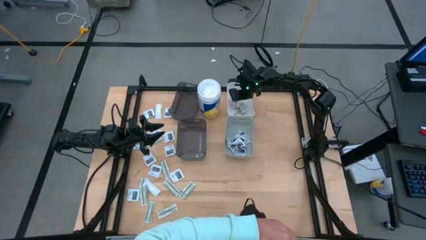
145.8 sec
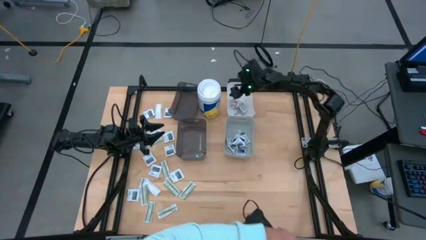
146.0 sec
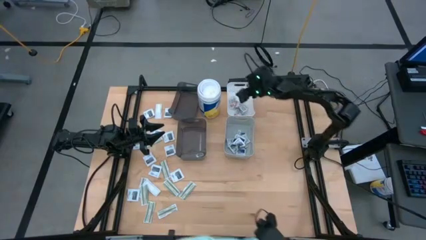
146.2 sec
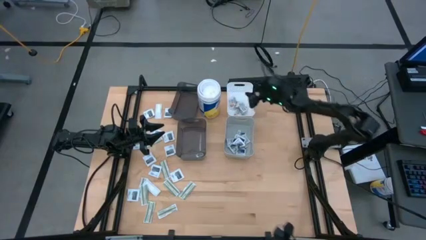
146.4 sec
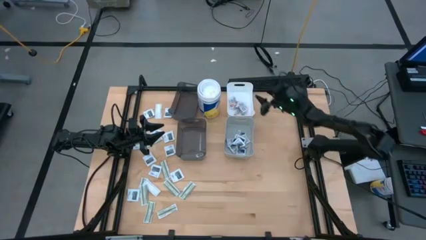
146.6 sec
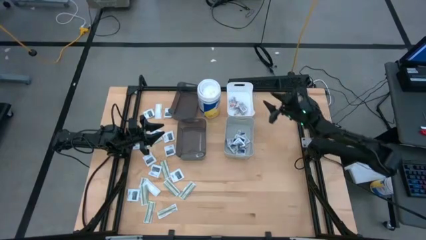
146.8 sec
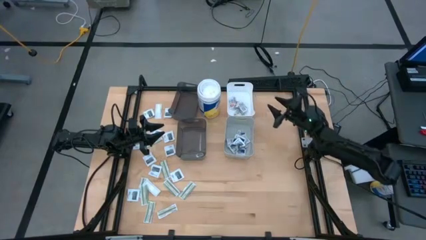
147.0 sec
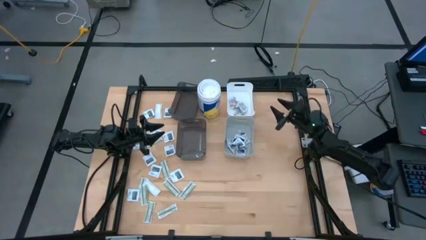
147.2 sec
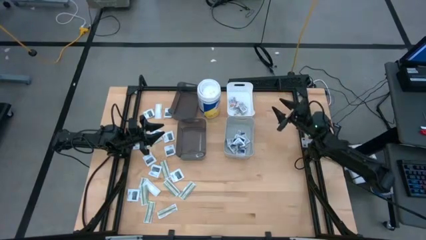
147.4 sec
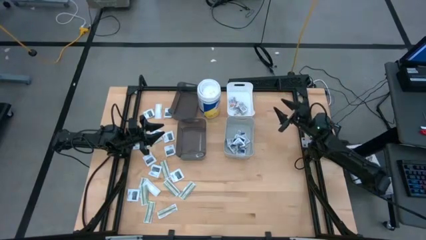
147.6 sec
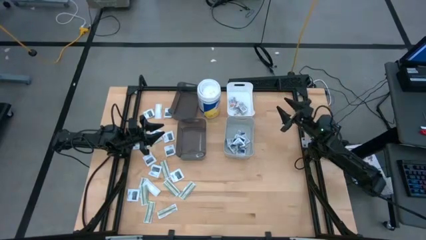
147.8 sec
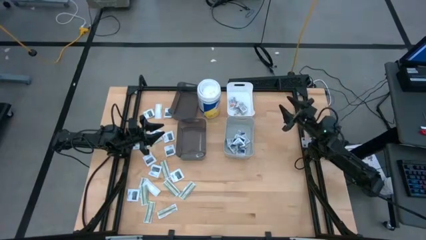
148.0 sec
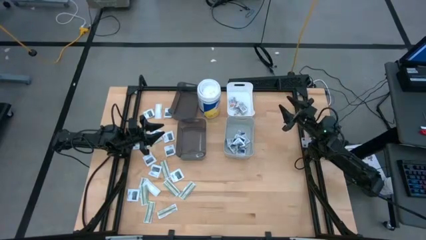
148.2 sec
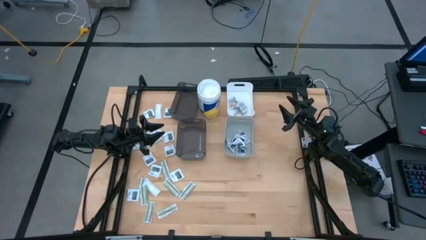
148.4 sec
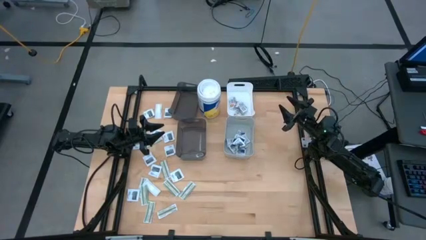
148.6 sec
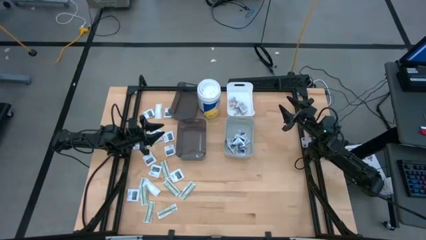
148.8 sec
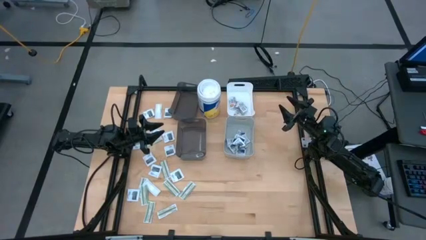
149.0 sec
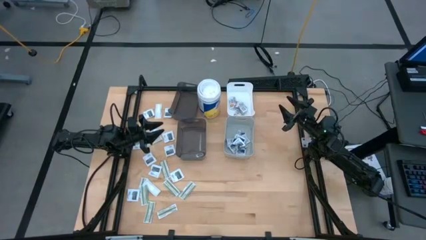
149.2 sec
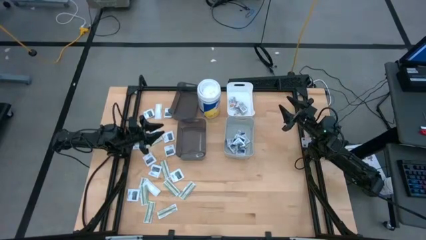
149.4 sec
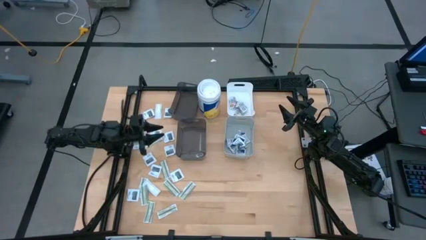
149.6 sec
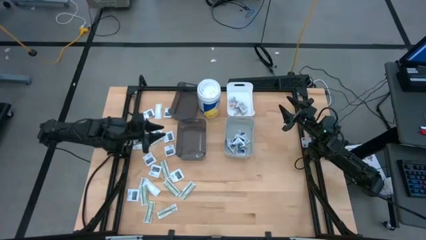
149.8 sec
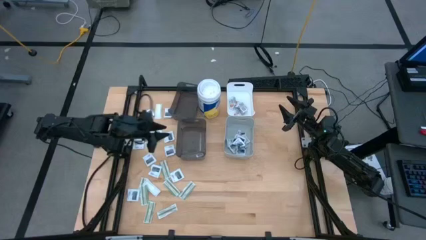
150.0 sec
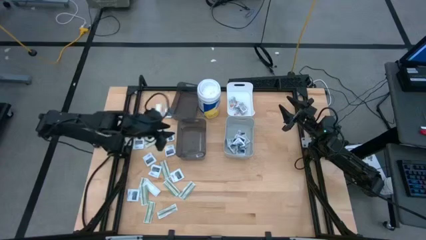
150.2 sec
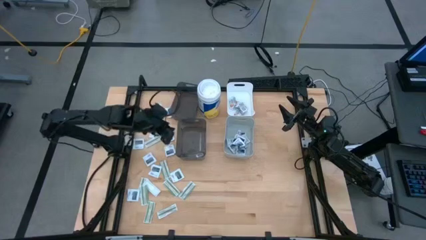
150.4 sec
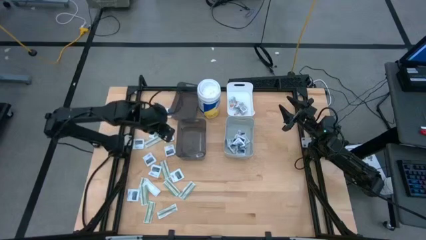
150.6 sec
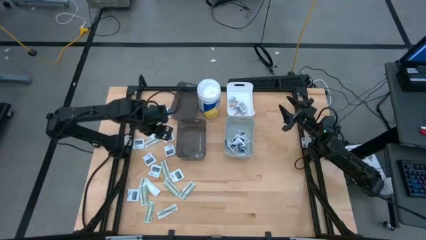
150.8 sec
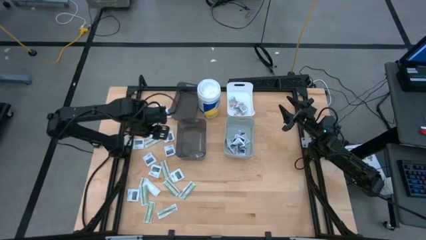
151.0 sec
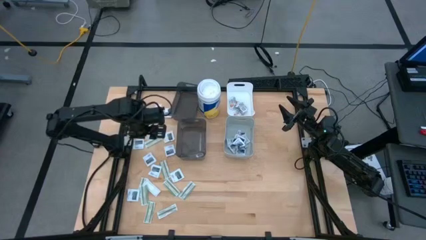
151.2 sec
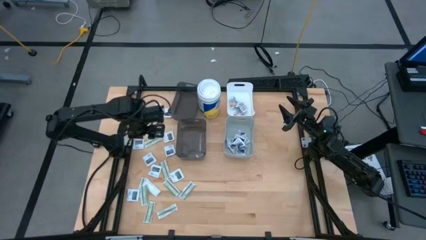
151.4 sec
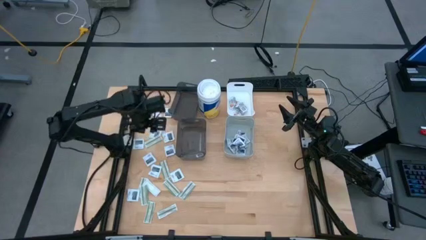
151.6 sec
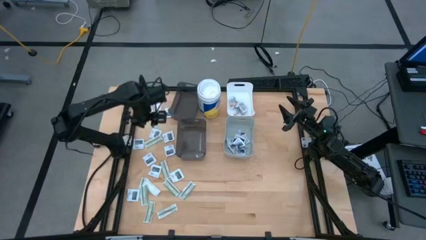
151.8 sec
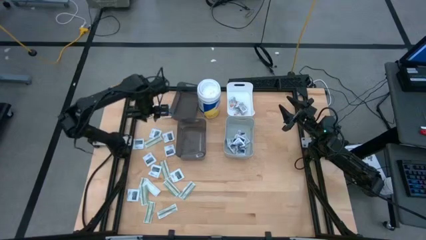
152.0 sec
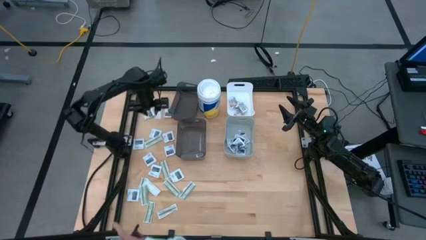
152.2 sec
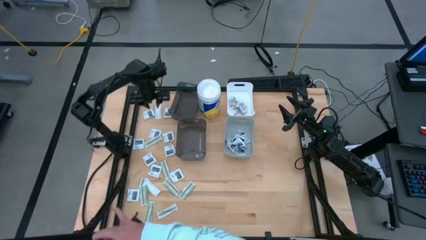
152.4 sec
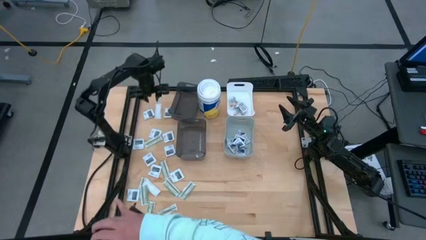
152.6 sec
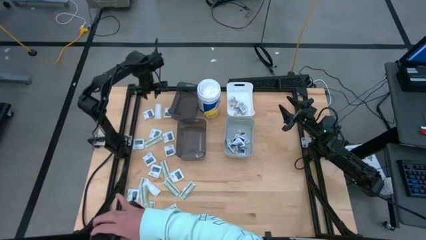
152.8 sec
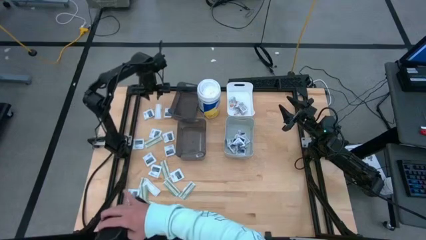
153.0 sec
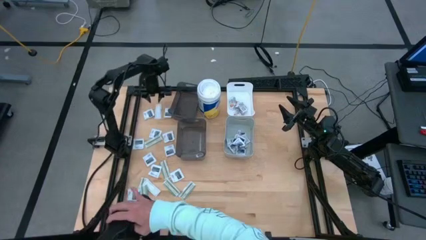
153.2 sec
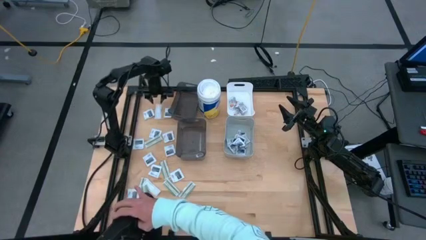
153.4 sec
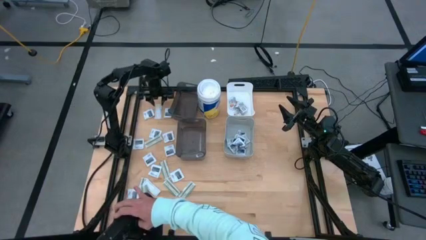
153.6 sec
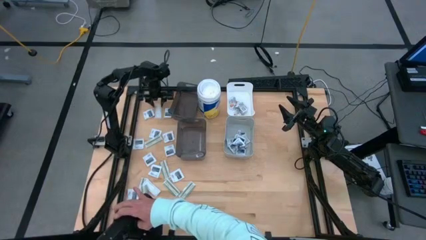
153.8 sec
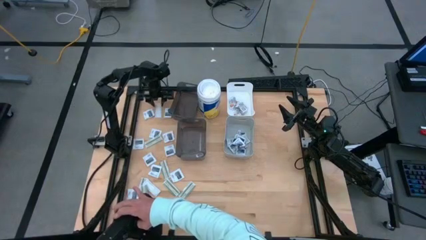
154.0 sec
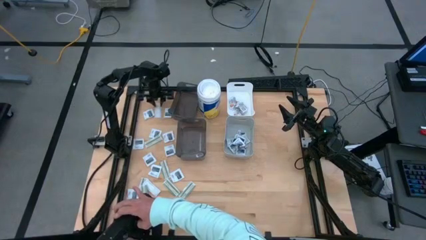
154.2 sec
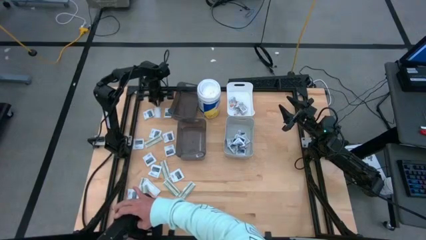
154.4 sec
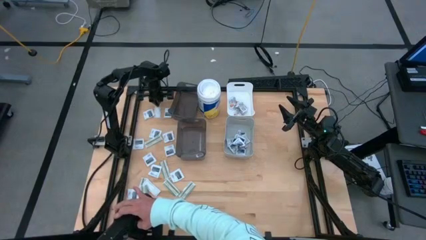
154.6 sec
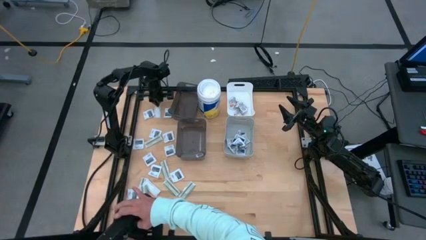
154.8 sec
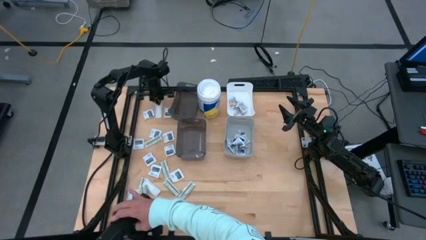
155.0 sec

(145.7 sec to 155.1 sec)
Task: Pick & Place First Aid Supplies
Put the bandage pack into the top black bin

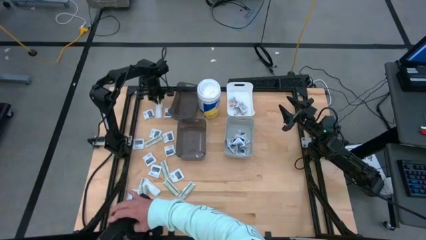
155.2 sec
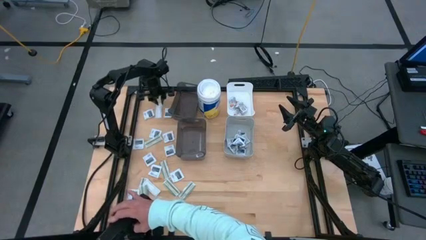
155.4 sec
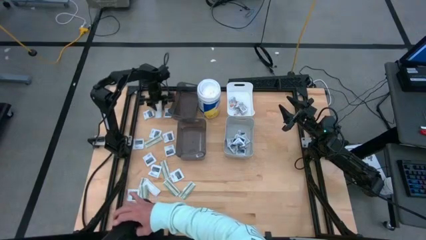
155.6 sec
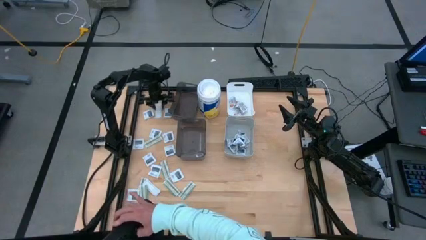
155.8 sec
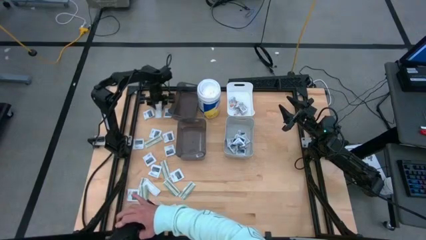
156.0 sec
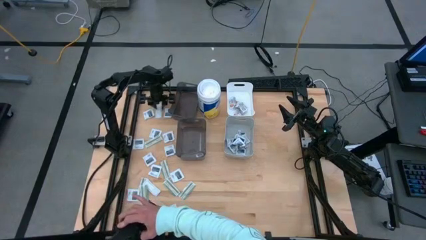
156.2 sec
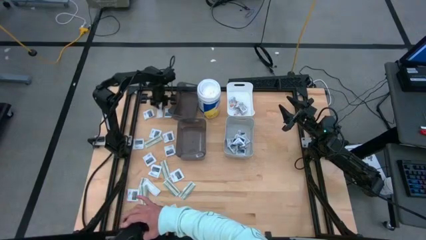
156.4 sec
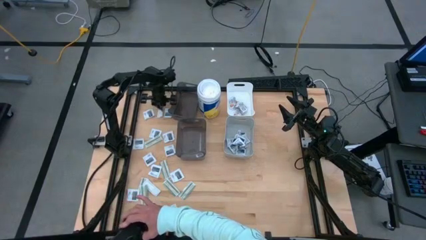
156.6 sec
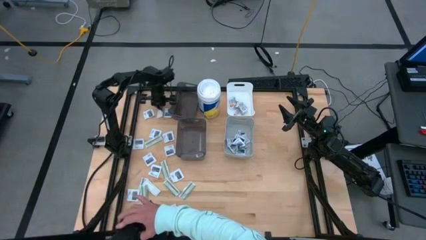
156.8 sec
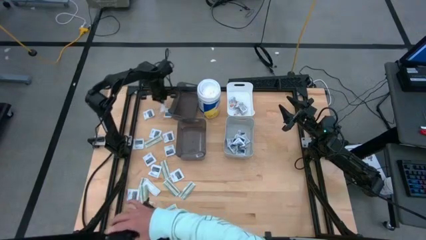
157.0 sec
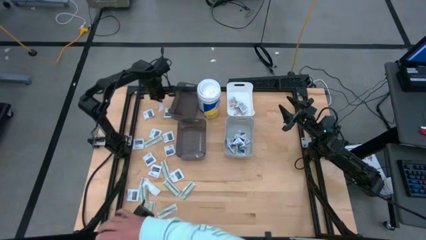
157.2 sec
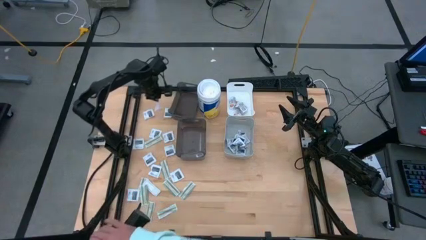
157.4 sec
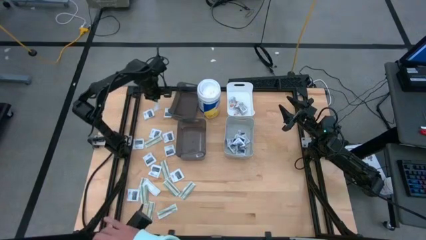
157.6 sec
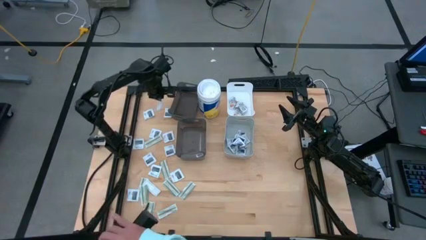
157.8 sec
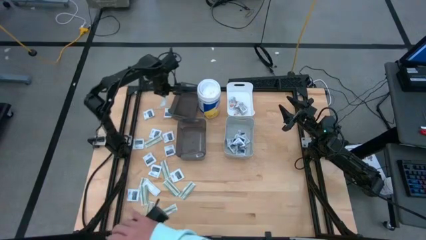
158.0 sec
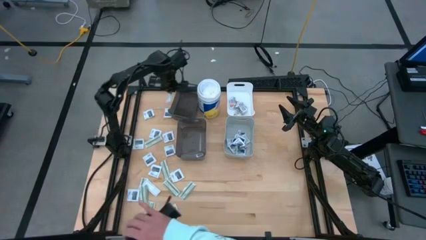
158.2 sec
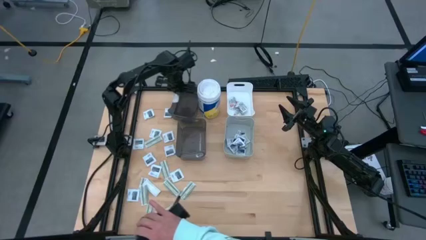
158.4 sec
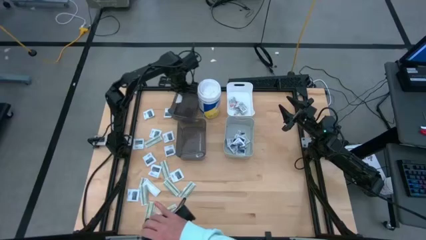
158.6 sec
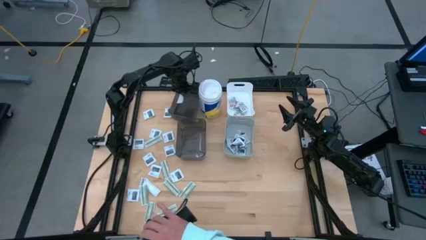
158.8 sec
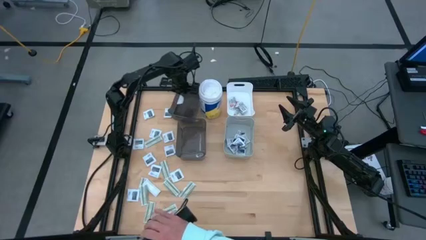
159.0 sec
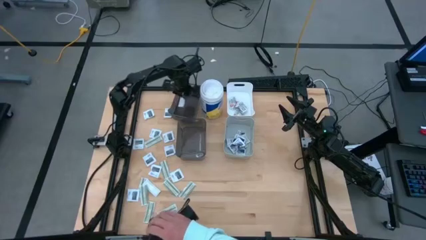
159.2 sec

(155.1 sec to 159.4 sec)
Put the bandage pack into the top black bin

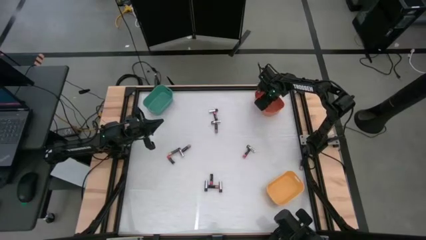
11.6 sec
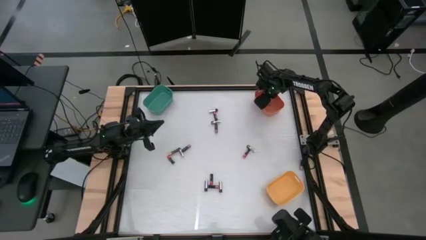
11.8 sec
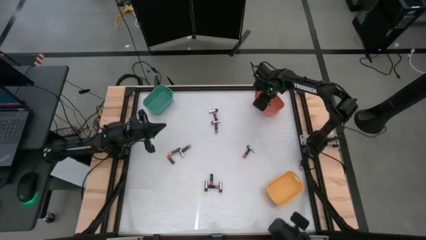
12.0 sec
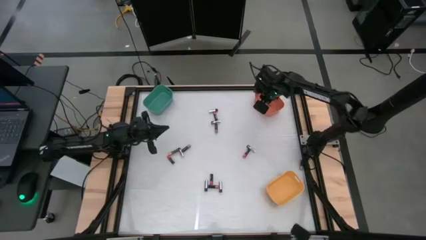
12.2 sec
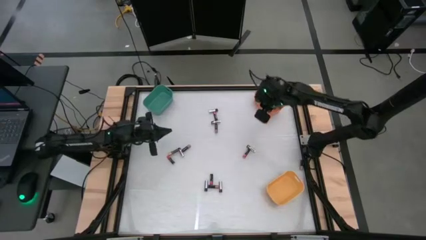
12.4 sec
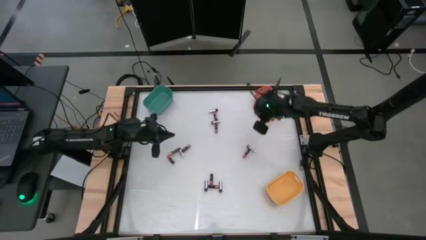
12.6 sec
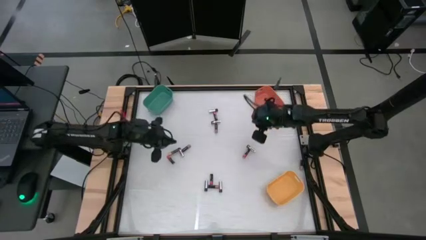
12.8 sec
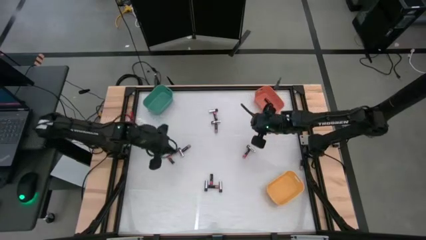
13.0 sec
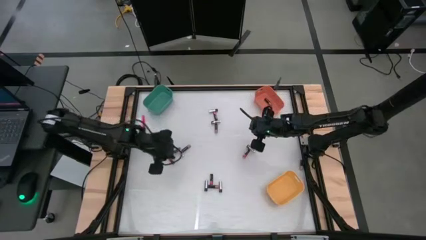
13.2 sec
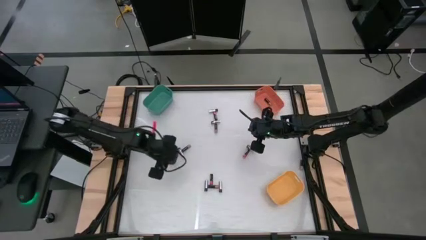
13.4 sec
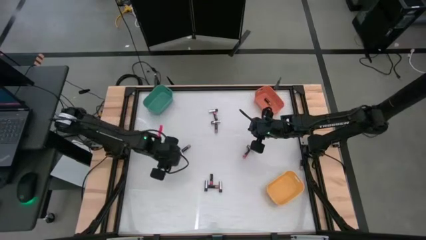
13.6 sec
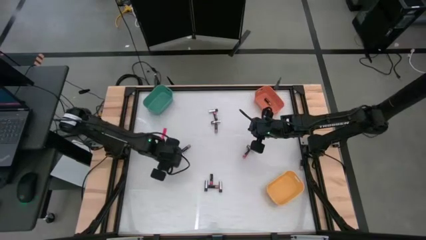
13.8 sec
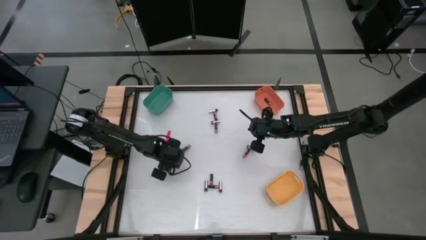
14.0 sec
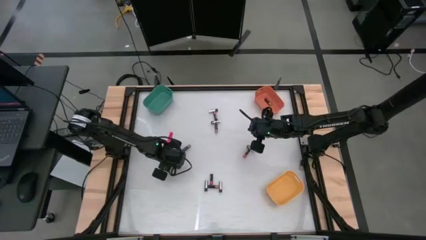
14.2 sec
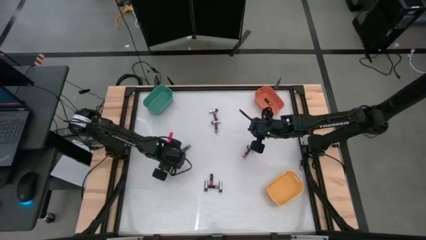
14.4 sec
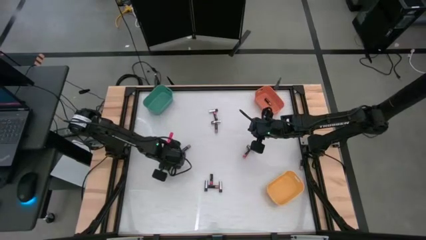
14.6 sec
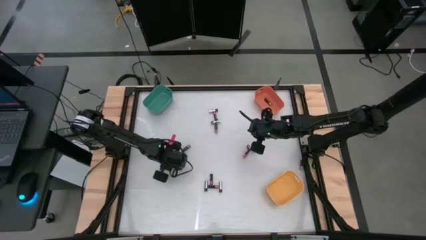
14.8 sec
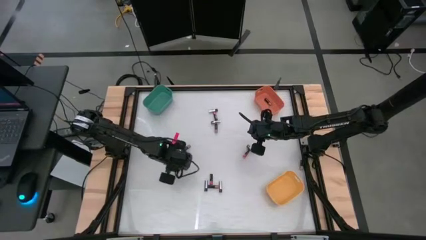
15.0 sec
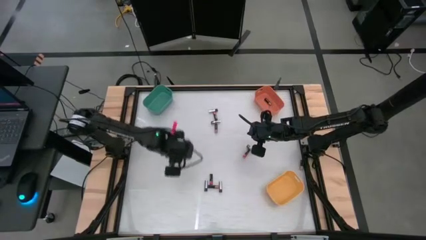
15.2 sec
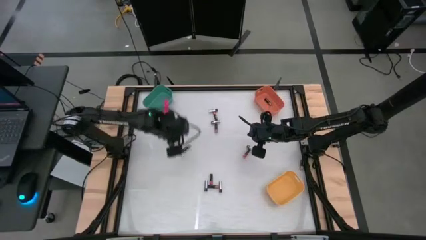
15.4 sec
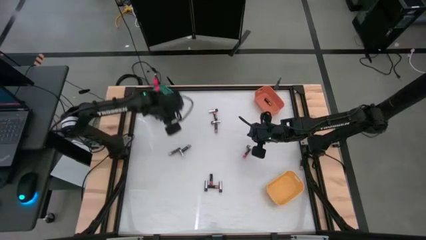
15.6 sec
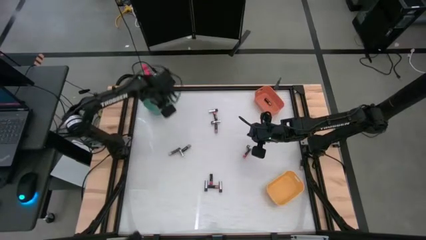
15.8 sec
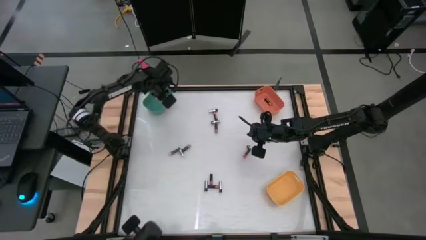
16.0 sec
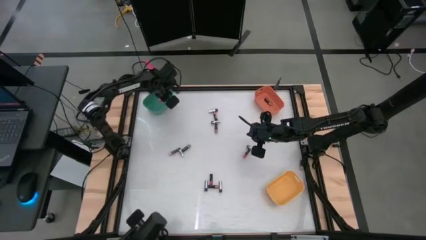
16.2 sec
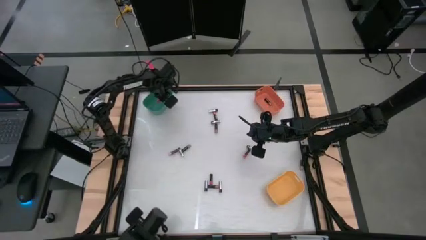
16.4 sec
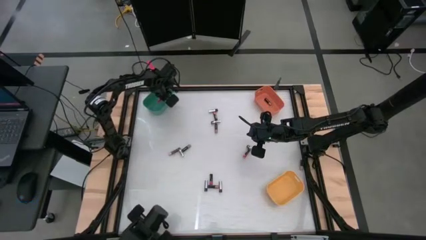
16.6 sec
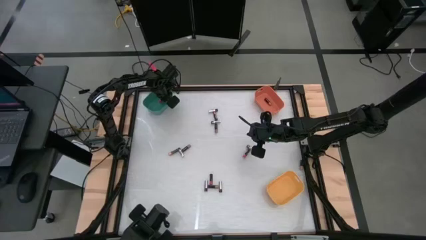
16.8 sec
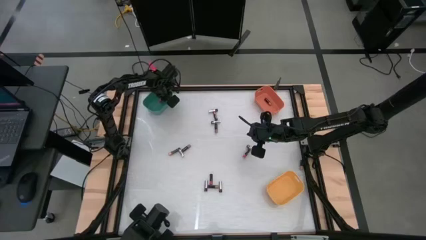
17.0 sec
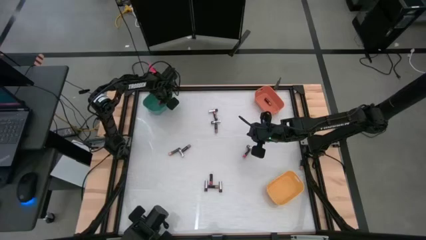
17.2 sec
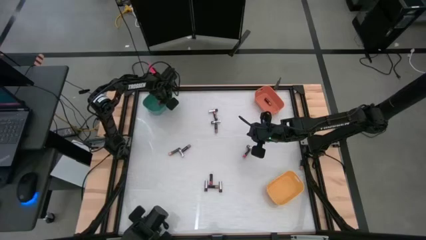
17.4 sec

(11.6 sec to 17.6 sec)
Task: Sort batteries
Put the red battery into the green bin
